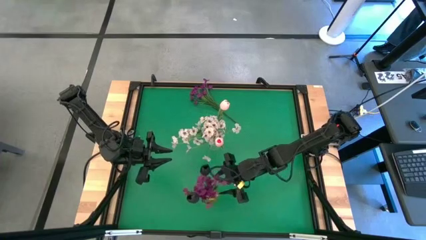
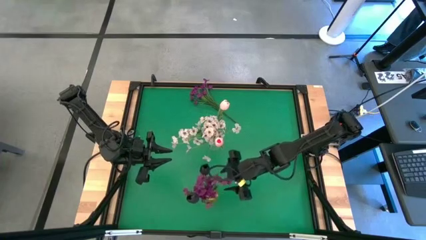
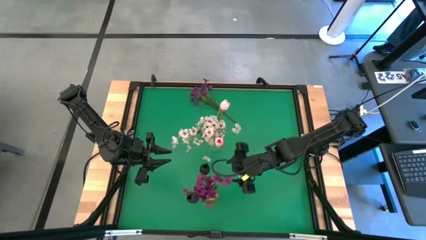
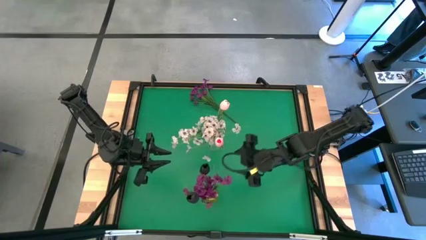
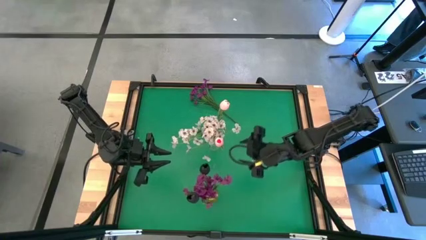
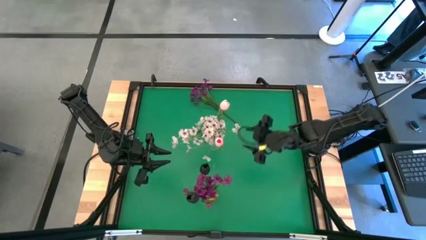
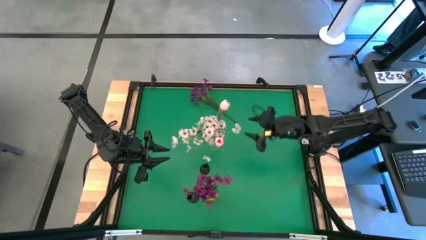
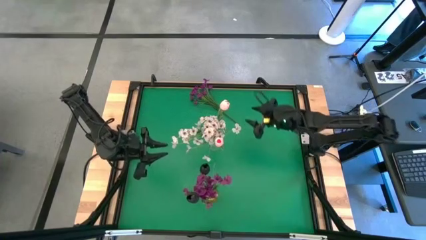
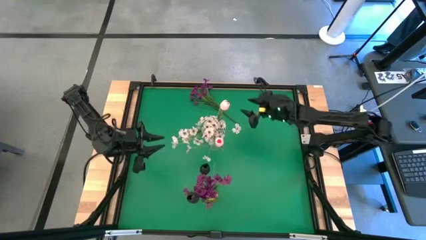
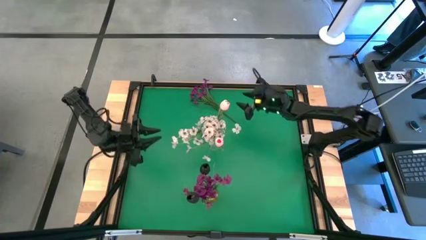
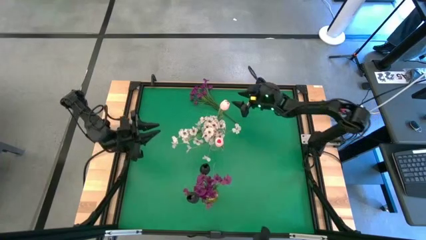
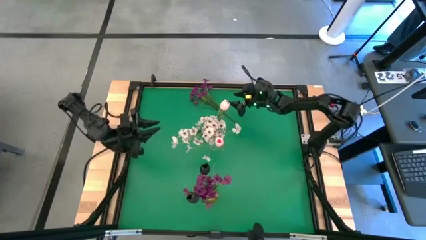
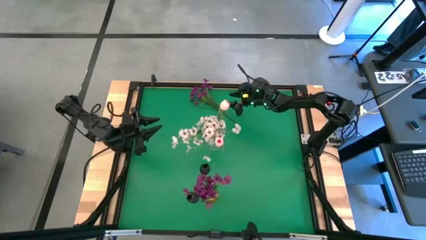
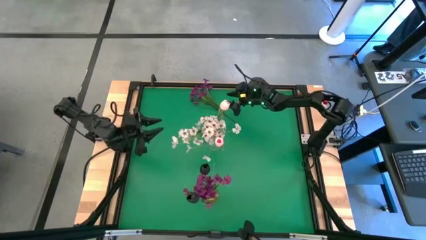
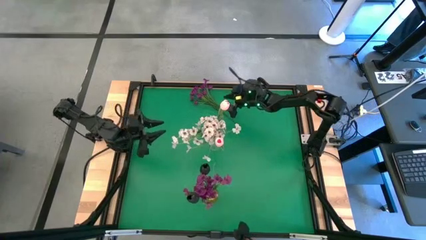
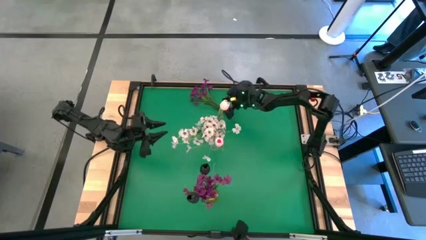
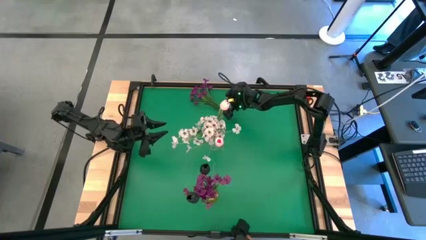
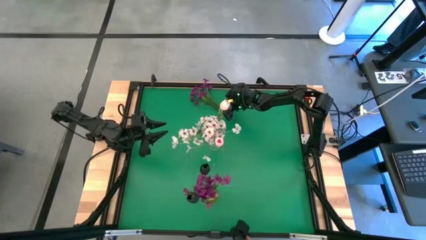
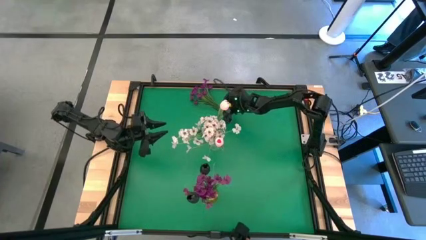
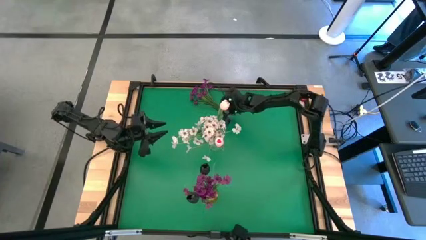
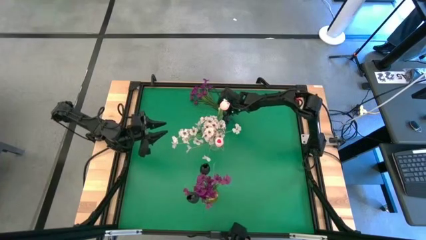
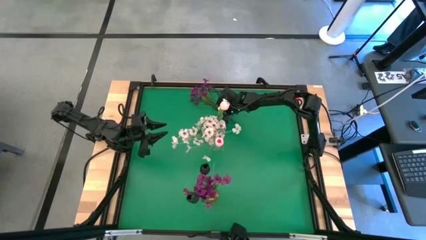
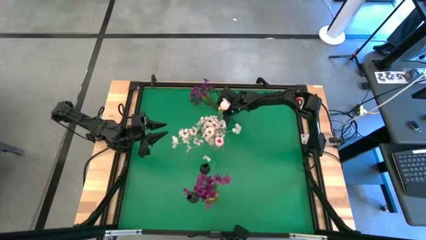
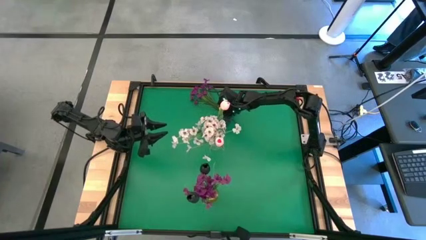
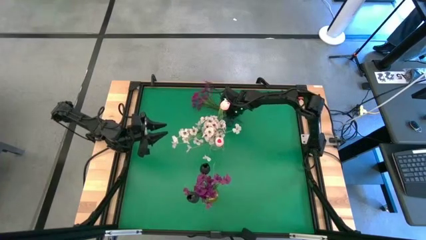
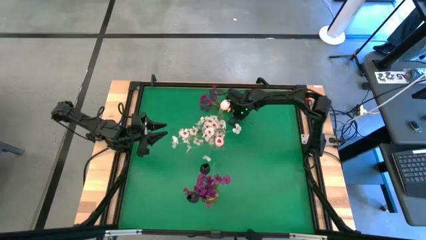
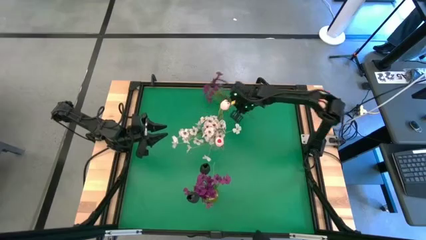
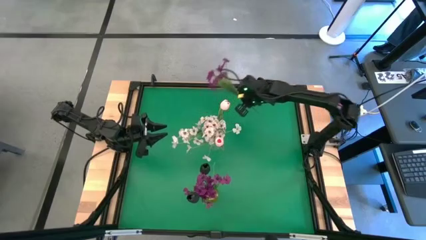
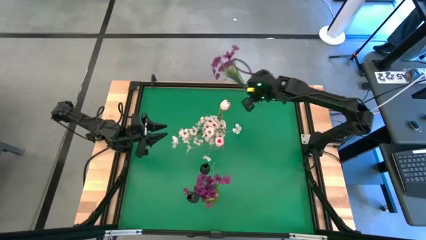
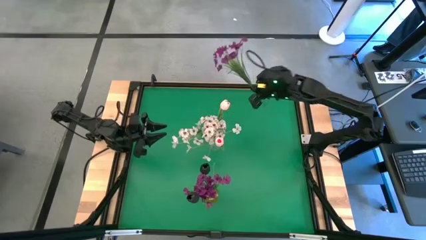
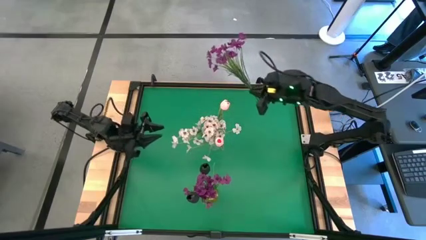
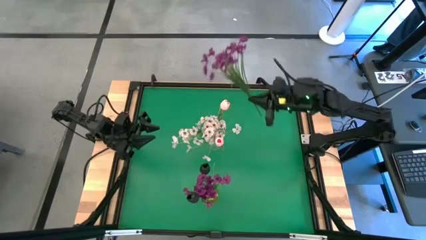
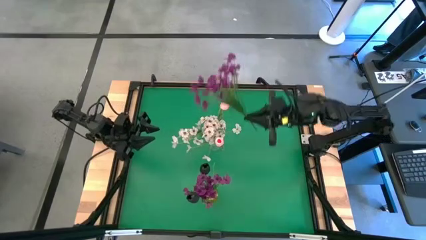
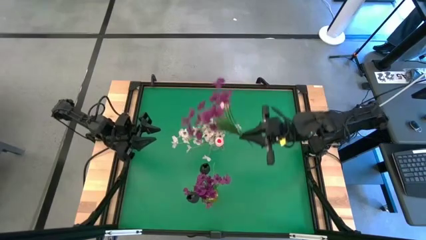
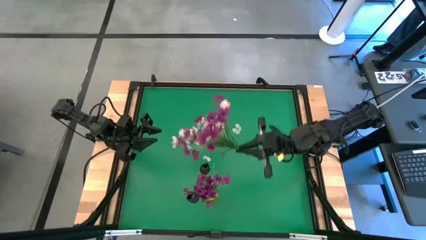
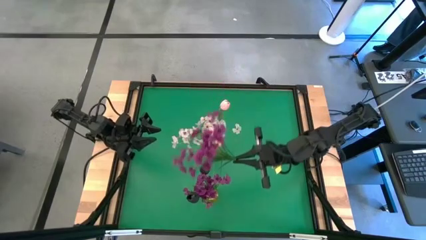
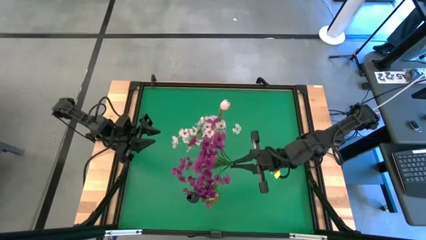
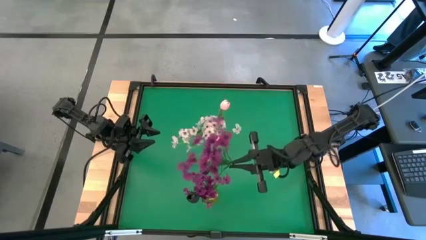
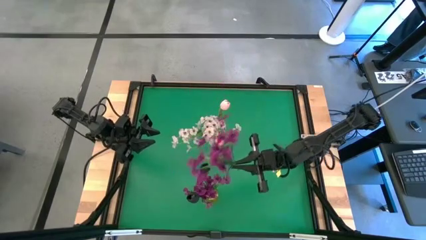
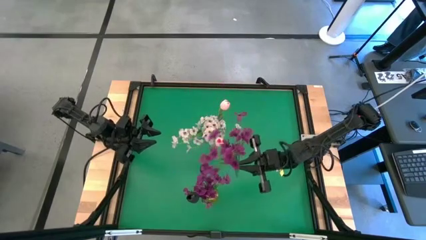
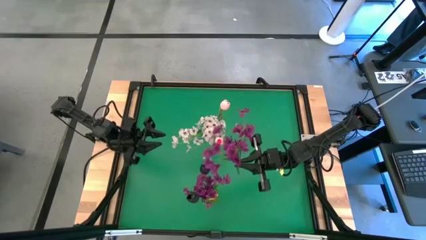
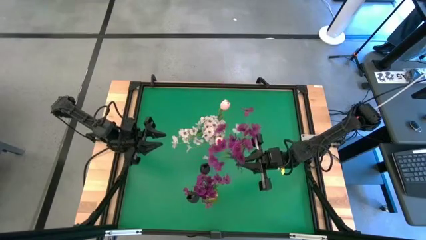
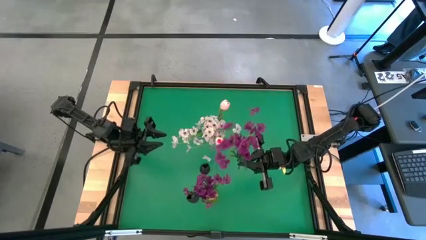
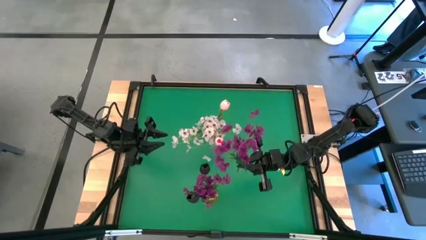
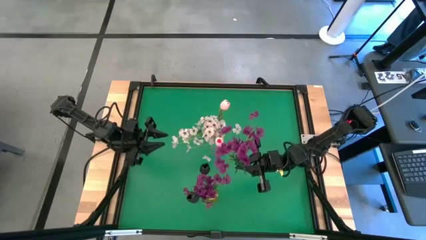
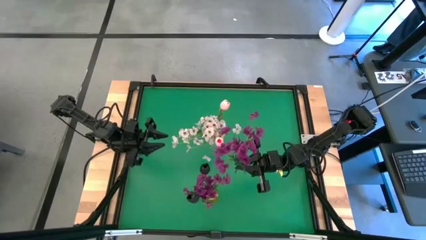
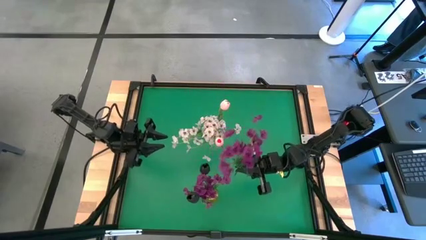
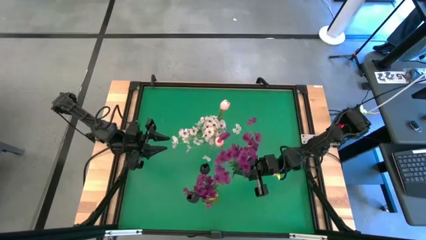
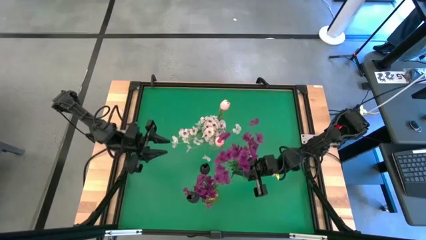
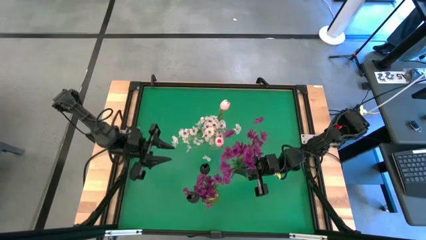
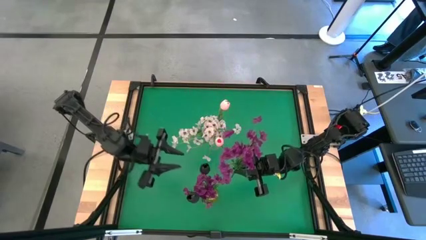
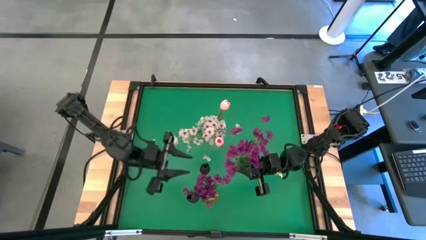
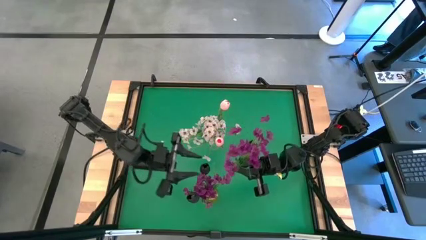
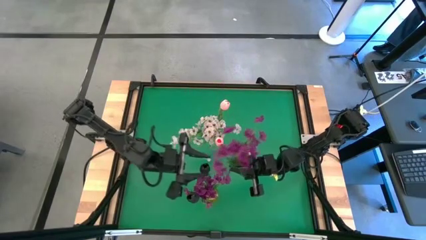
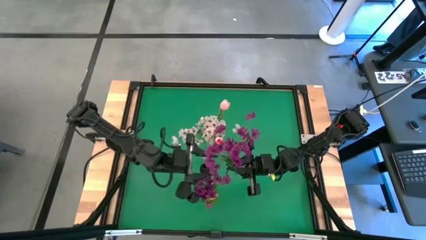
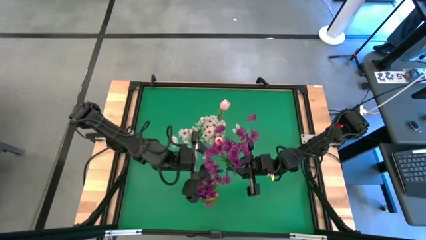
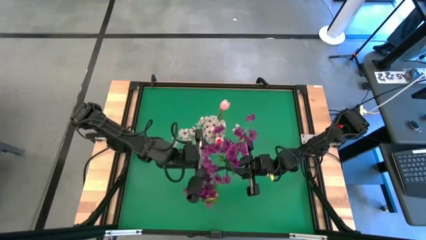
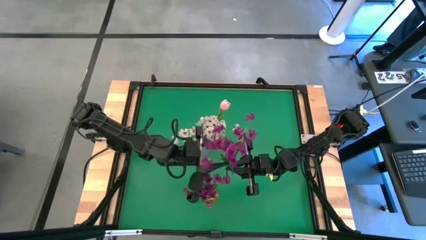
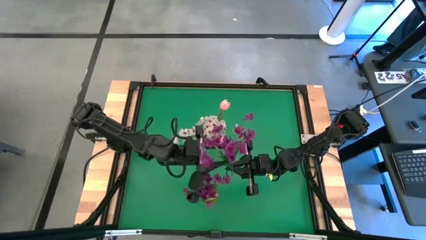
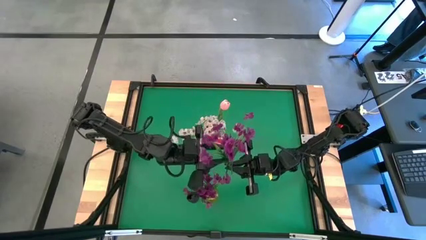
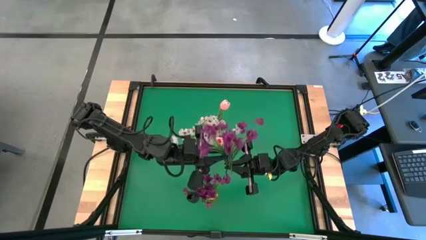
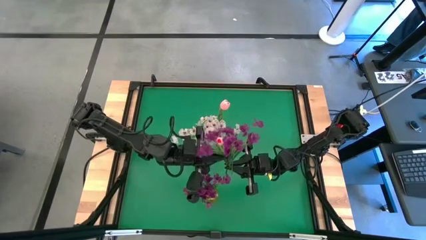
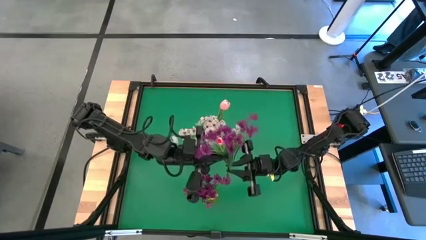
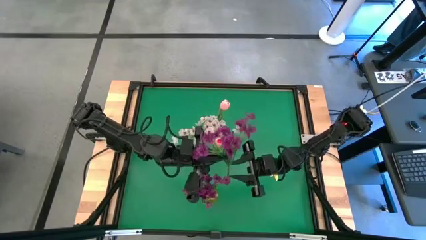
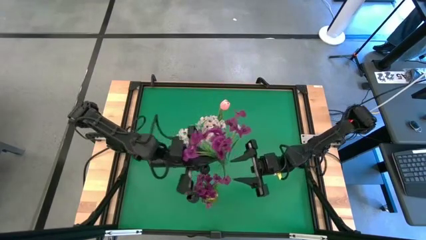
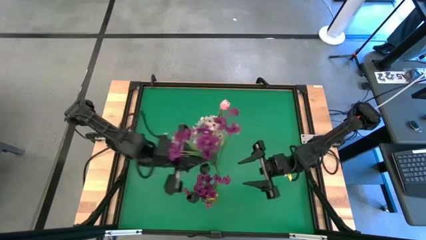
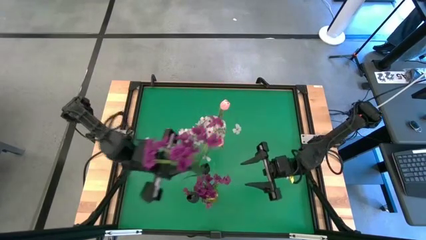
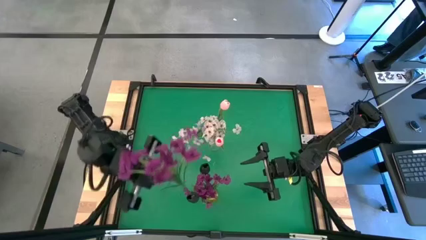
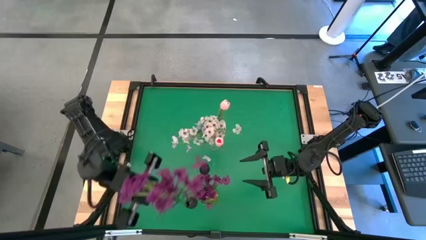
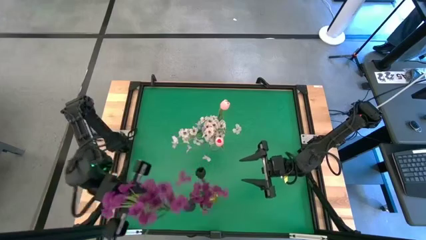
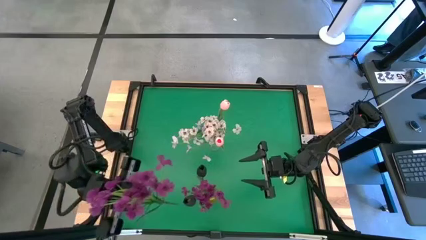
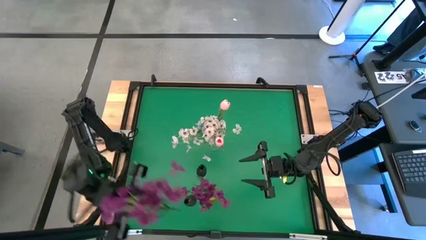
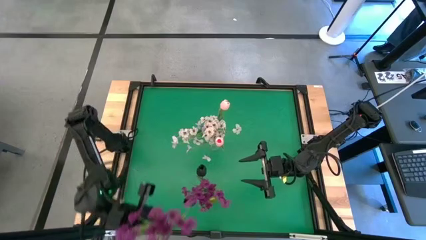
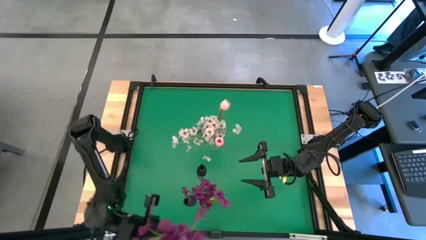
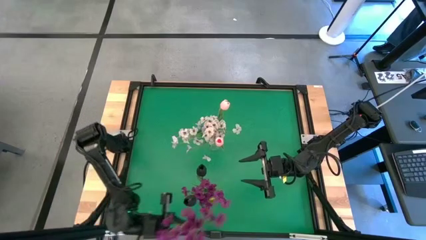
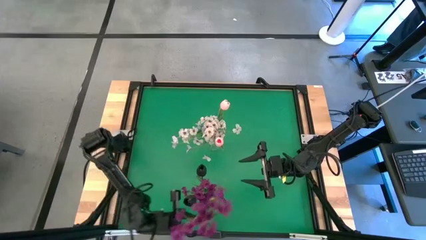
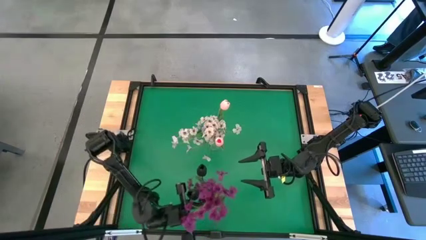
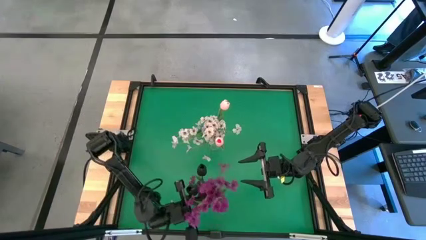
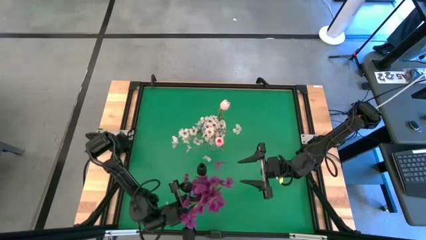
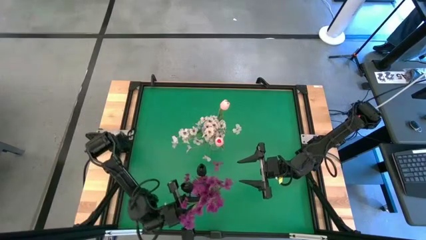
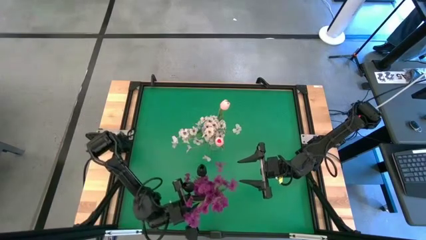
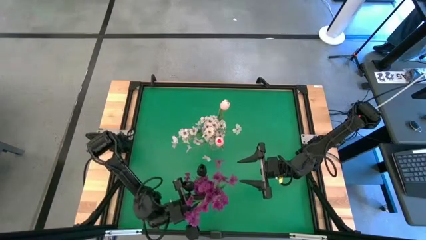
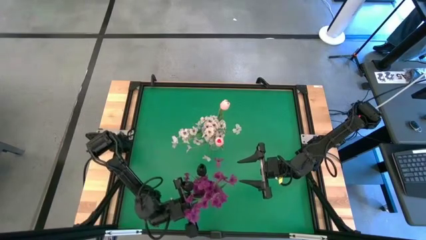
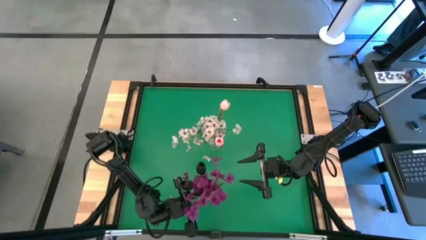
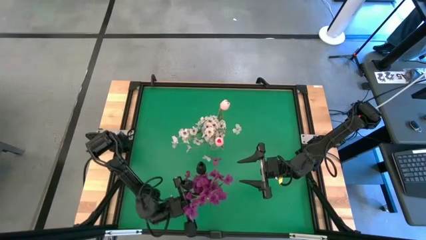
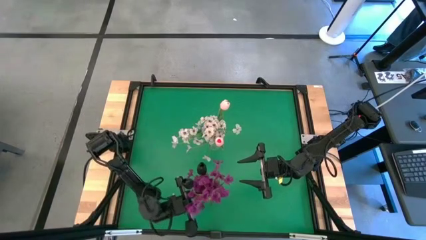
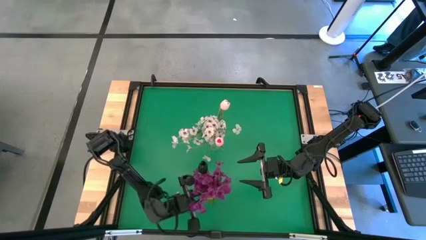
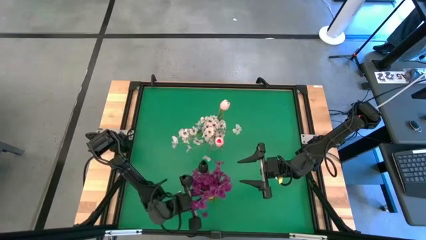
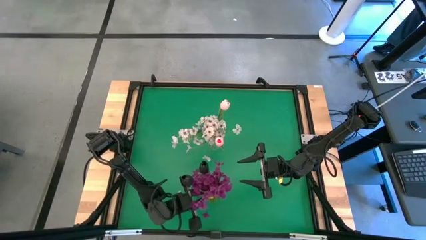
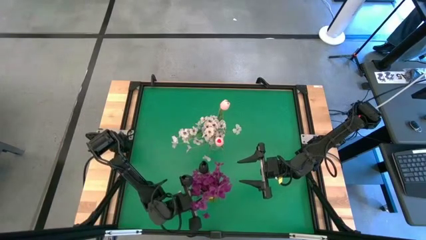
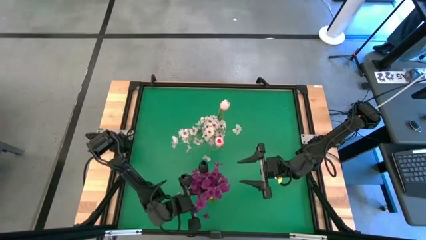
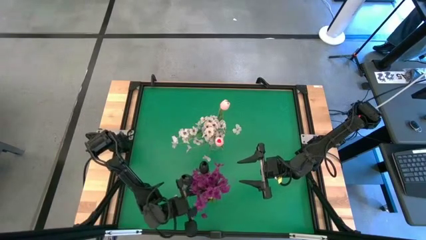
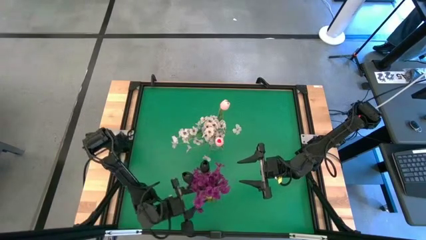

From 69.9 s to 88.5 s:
Task: Sort flowers into vase by color
Put the violet flowers into the yellow crystal vase
